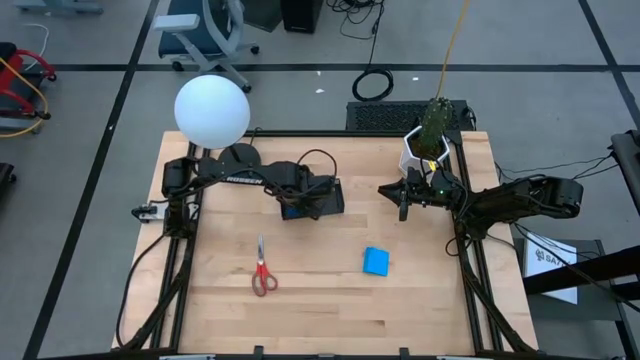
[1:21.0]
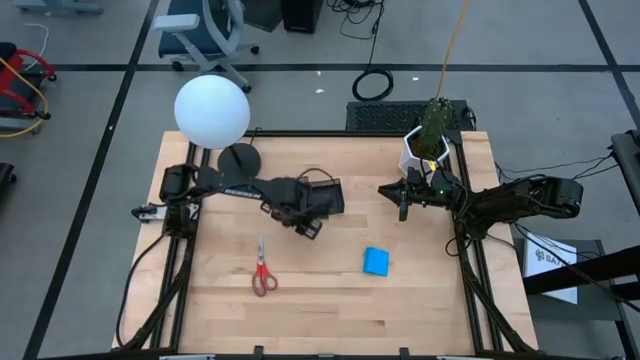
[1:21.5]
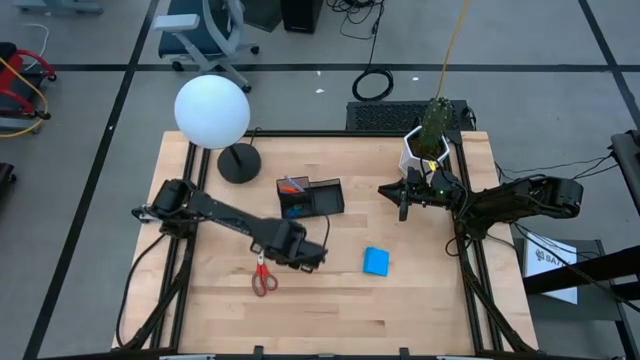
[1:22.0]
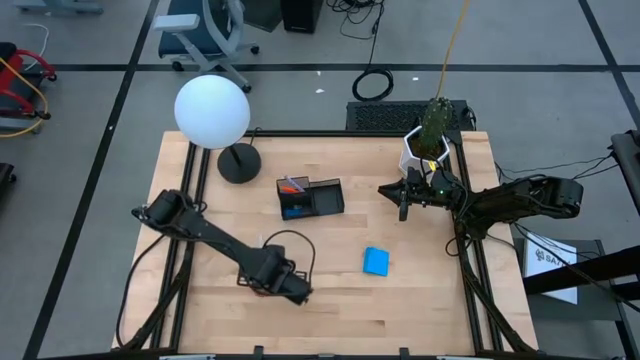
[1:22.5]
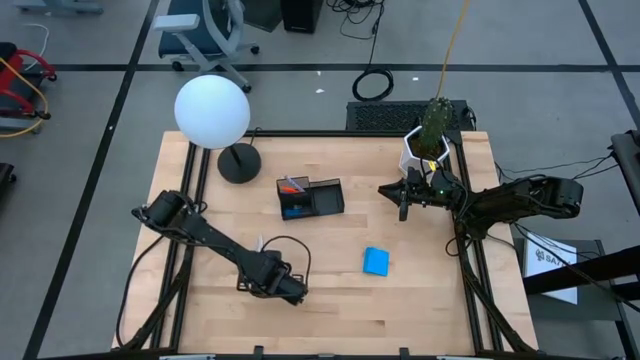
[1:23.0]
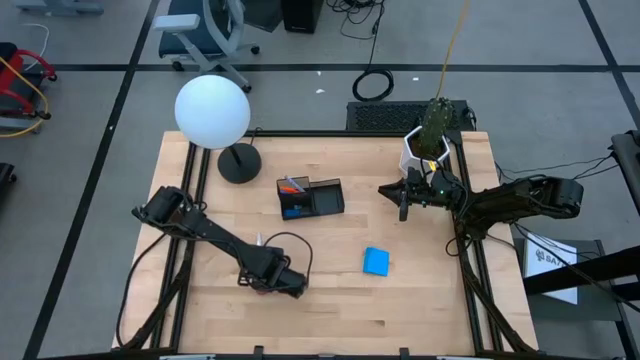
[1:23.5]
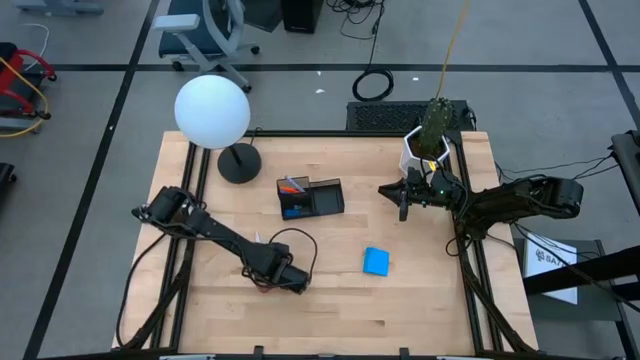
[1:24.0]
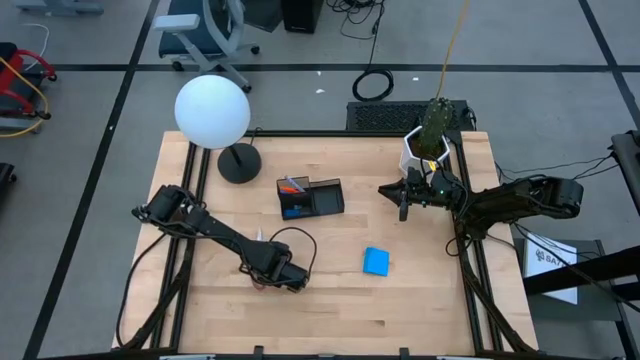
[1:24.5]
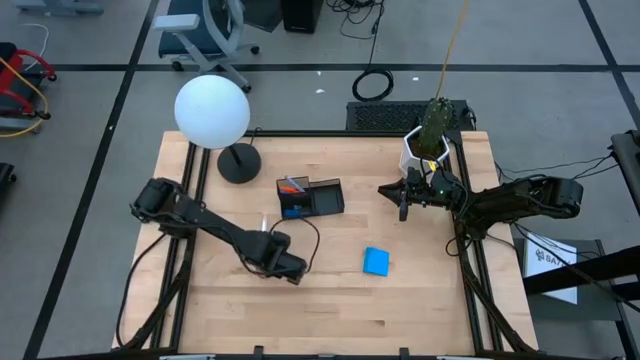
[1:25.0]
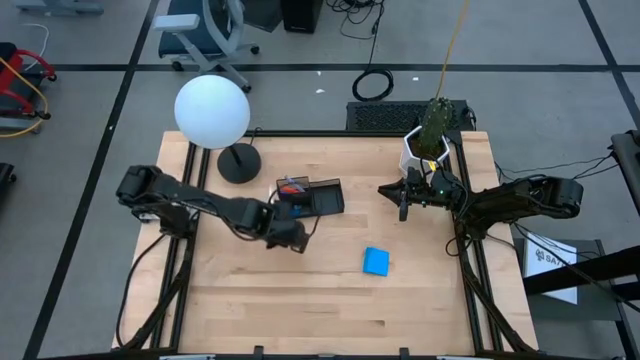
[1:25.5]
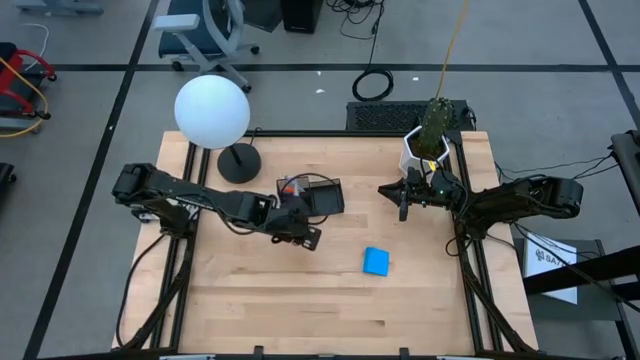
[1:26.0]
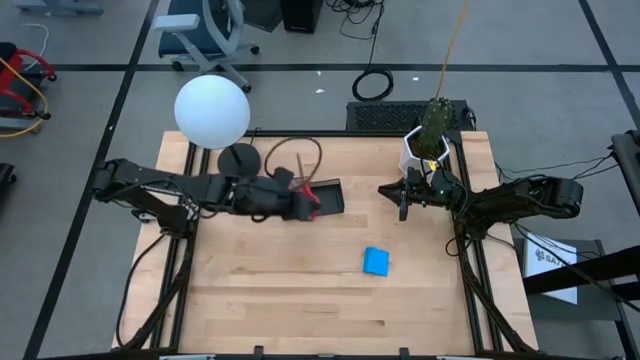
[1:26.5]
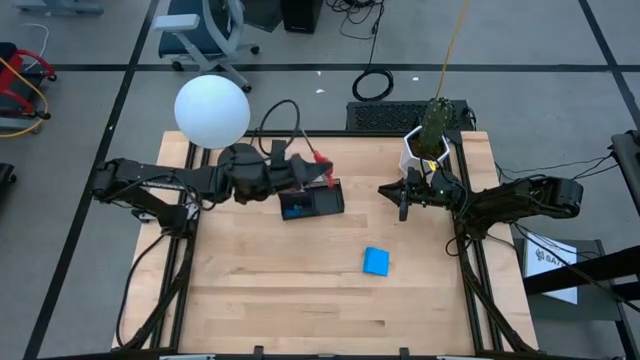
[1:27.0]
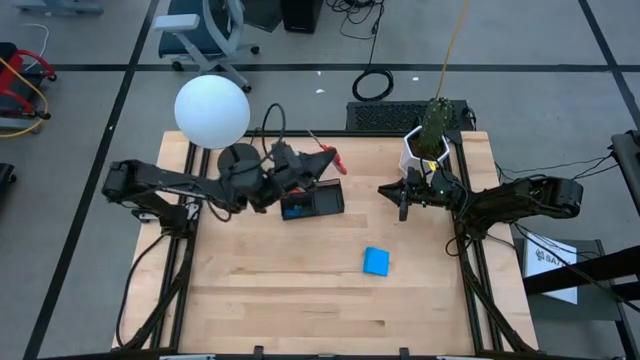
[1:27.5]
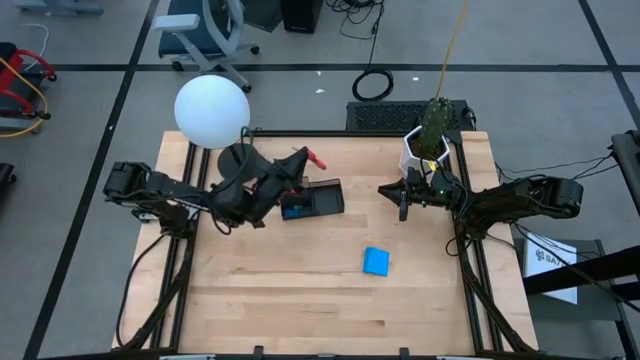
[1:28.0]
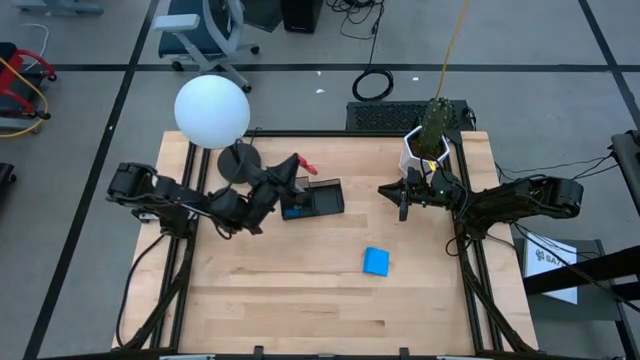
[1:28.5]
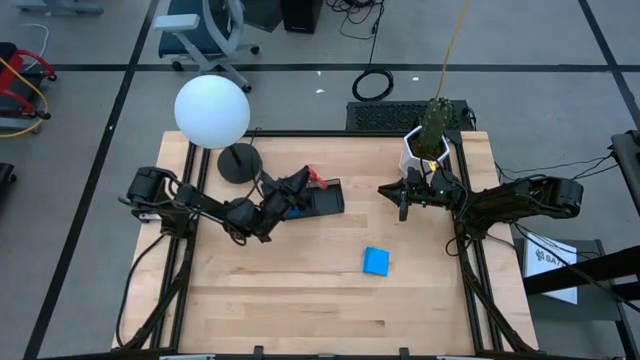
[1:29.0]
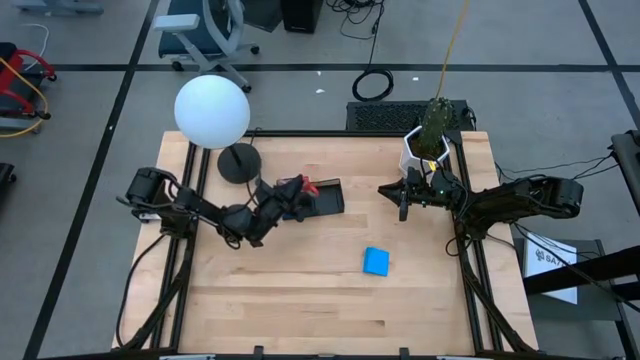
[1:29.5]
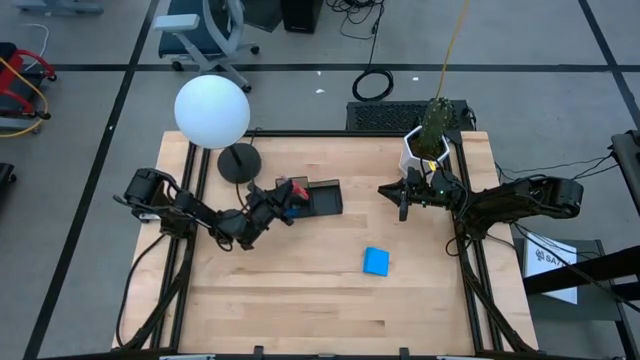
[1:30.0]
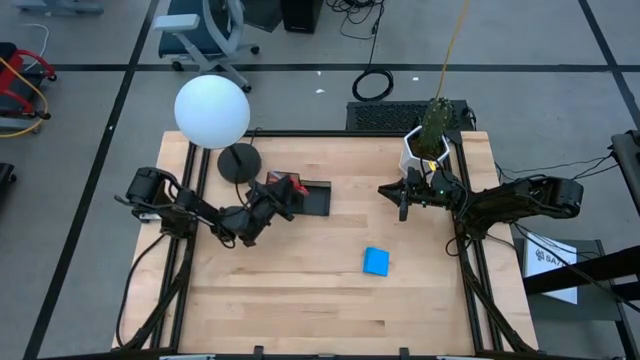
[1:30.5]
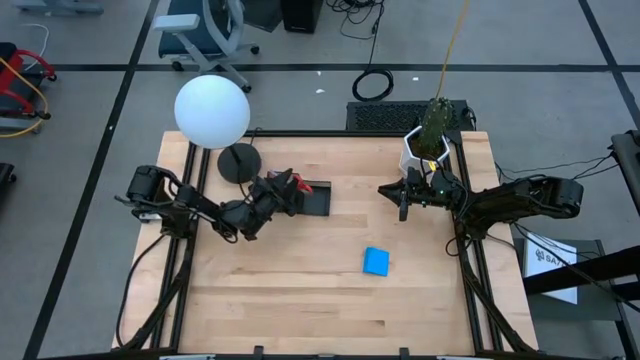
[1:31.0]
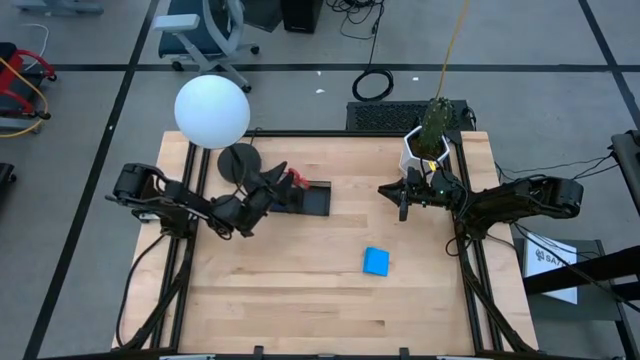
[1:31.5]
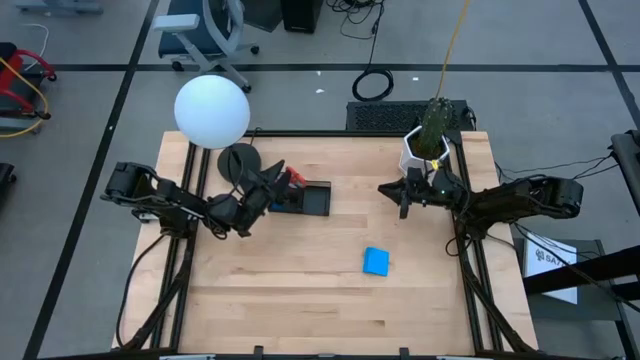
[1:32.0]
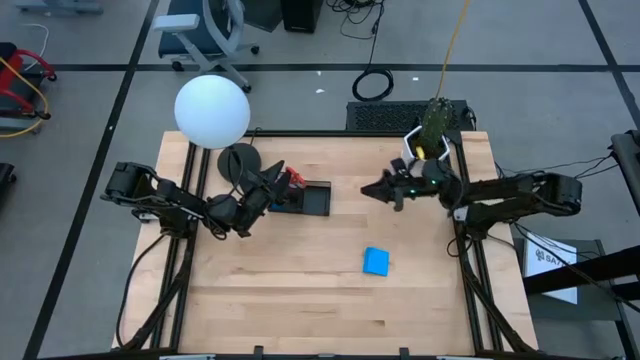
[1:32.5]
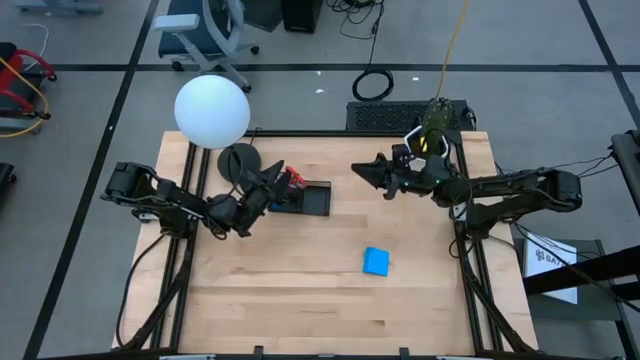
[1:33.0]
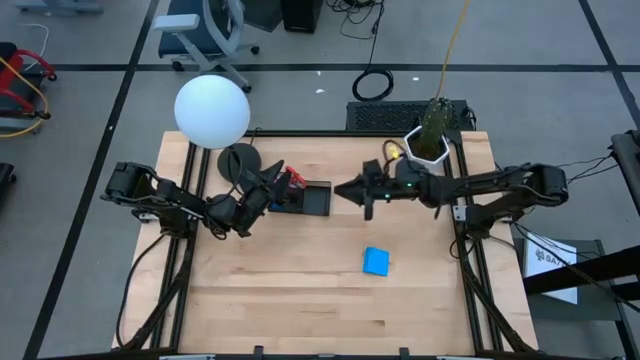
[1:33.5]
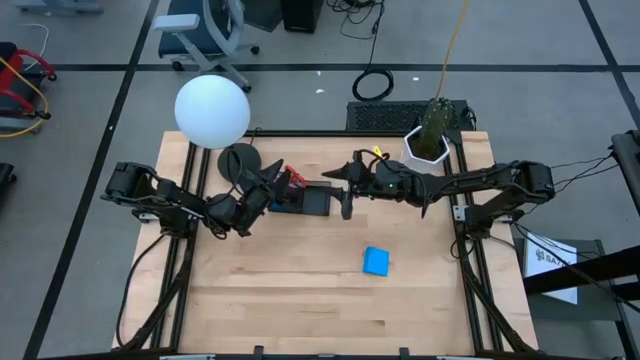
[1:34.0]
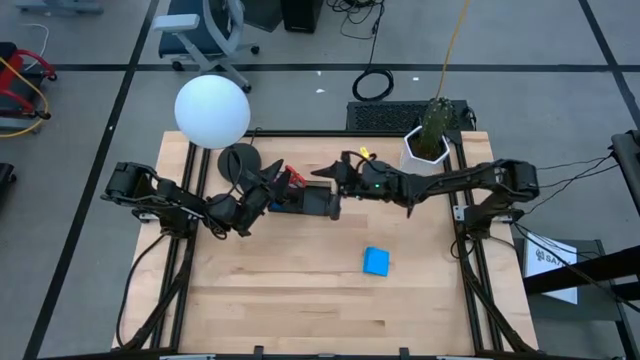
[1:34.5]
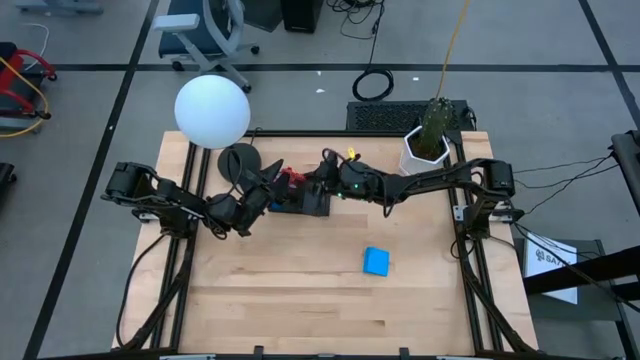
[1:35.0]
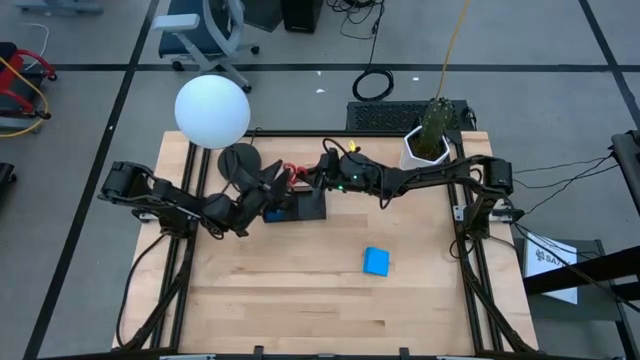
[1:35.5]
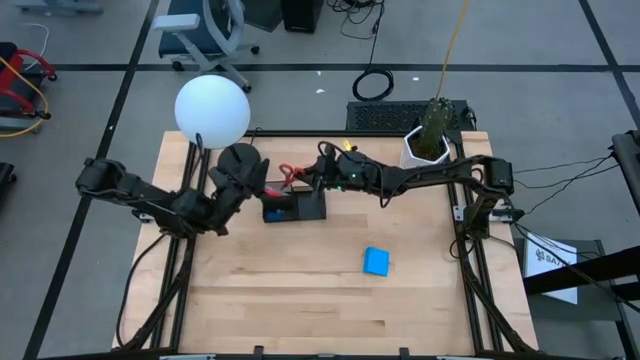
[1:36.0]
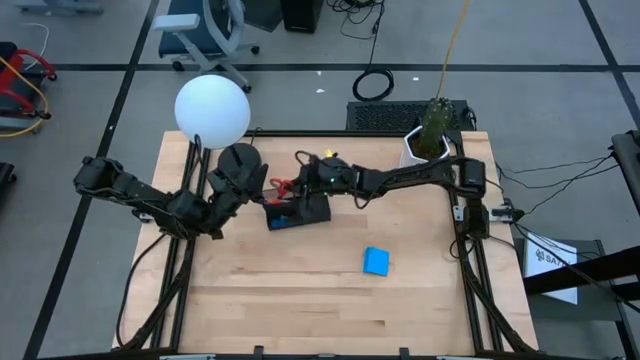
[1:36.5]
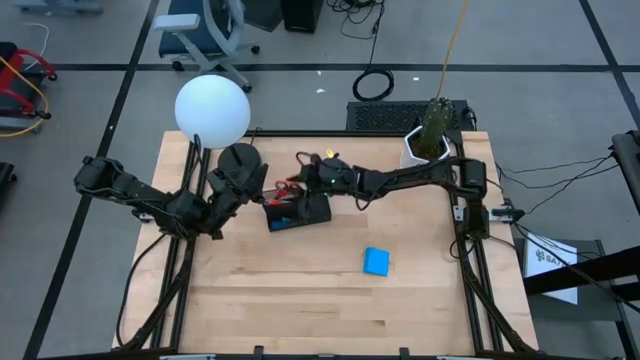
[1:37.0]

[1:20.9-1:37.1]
Task: Pick and place office supplies into organizer
Put the red scissors into the black desk organizer

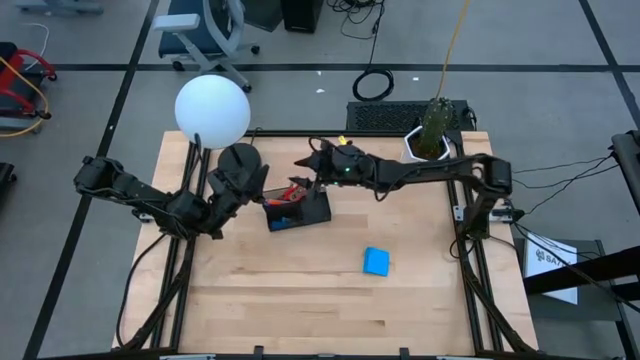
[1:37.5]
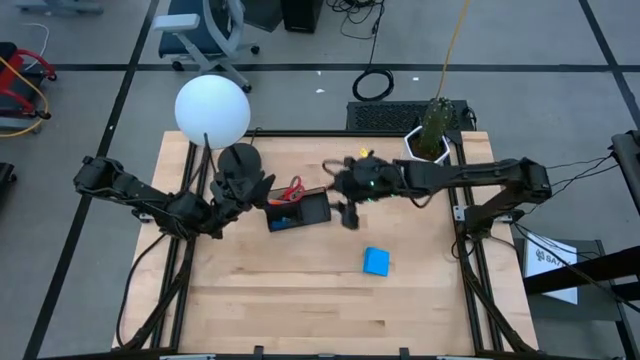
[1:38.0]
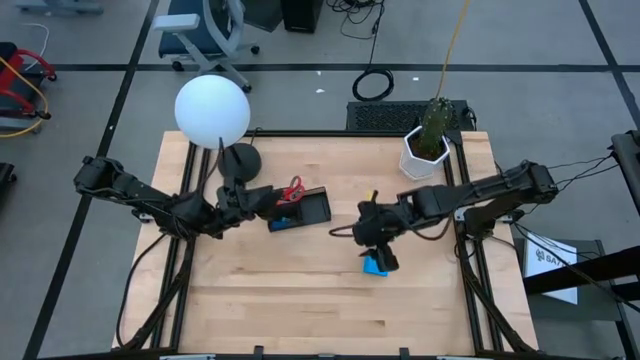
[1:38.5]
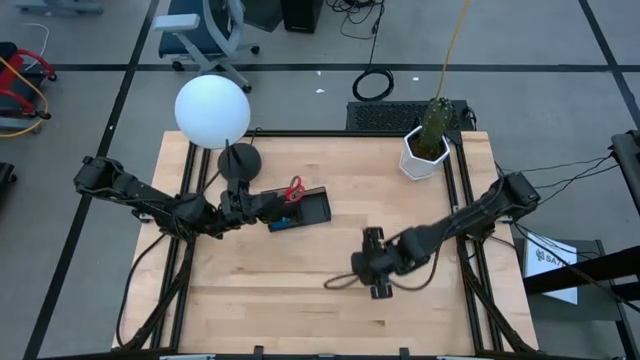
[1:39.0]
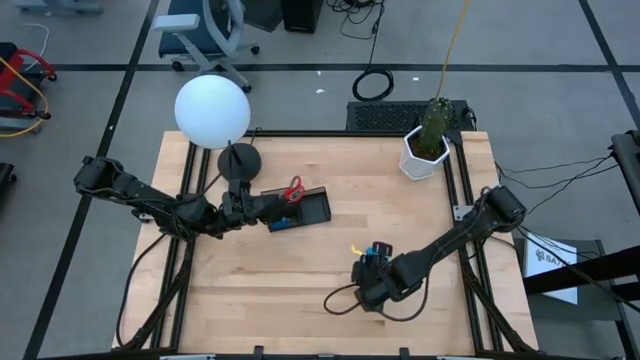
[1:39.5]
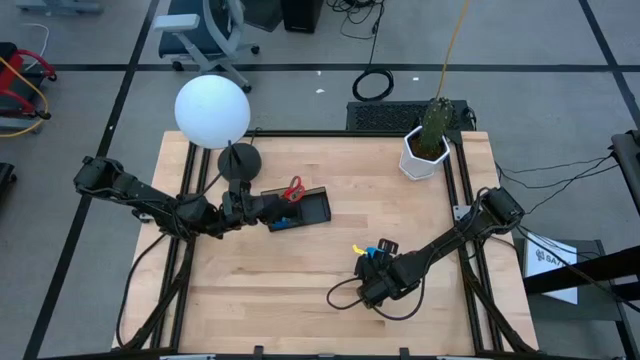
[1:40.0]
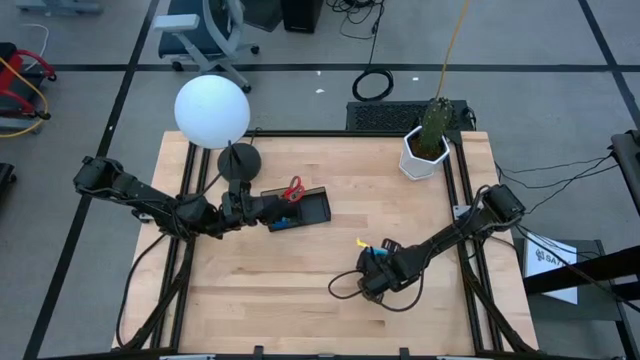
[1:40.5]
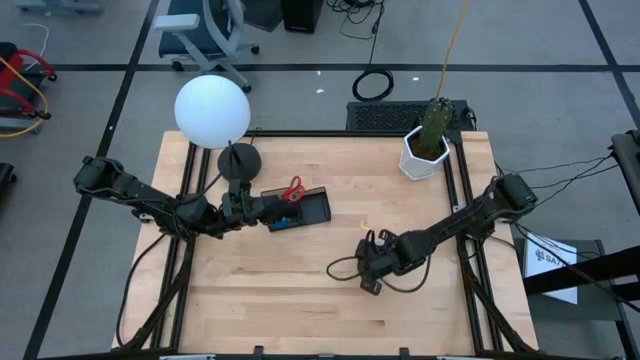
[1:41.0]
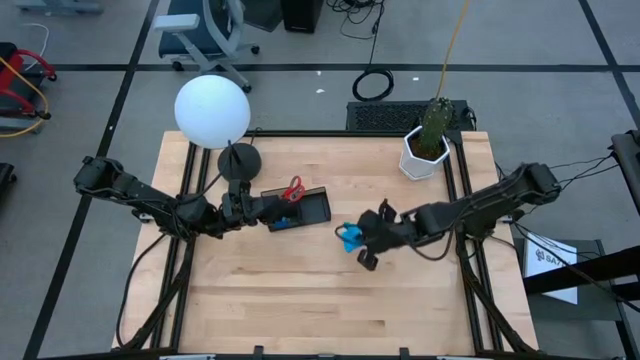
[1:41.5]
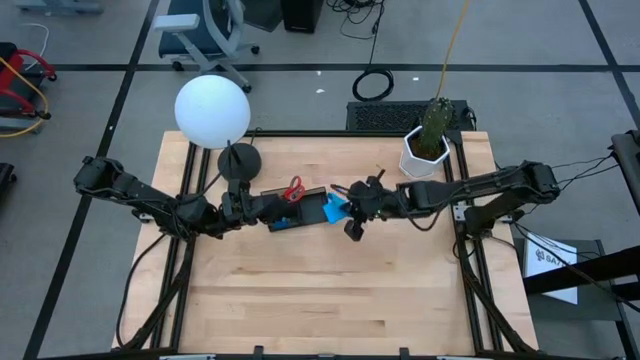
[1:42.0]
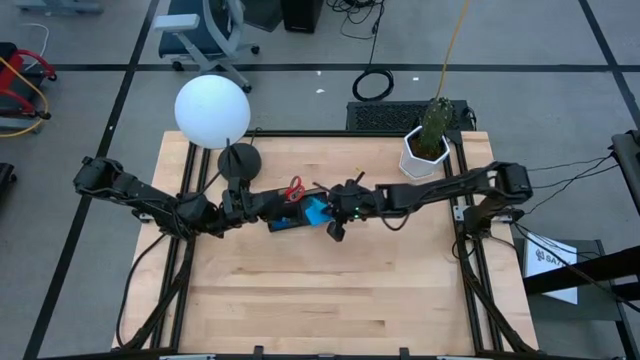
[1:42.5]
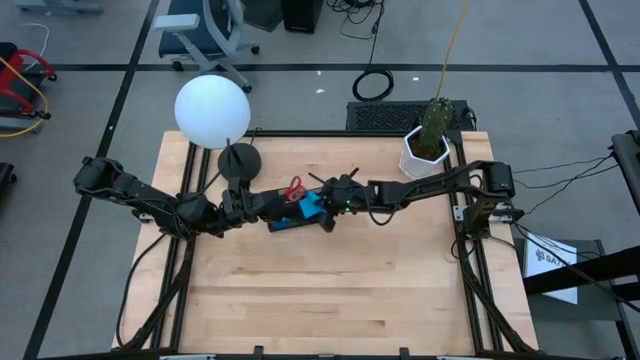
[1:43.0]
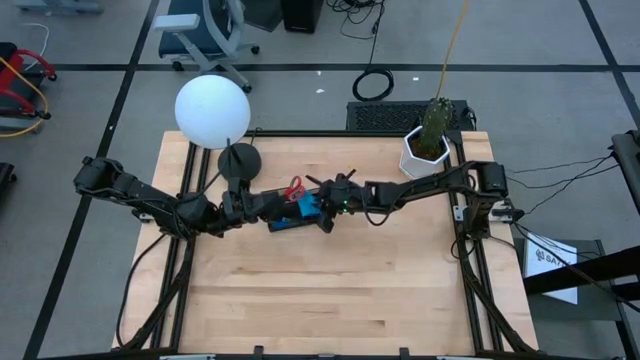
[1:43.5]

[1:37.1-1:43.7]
Put the blue sticky note into the black desk organizer
